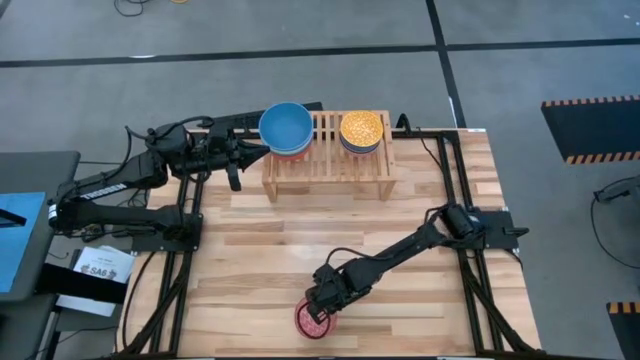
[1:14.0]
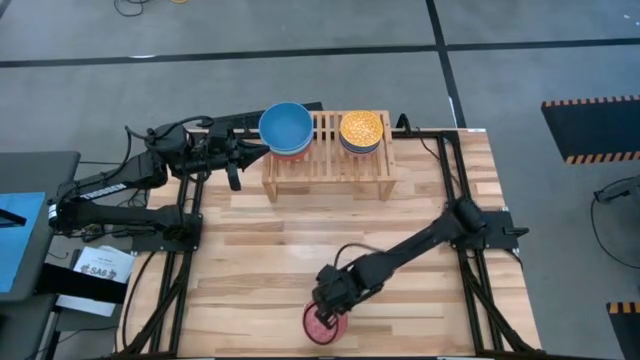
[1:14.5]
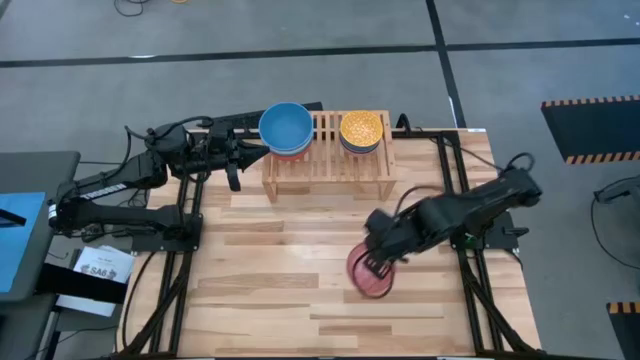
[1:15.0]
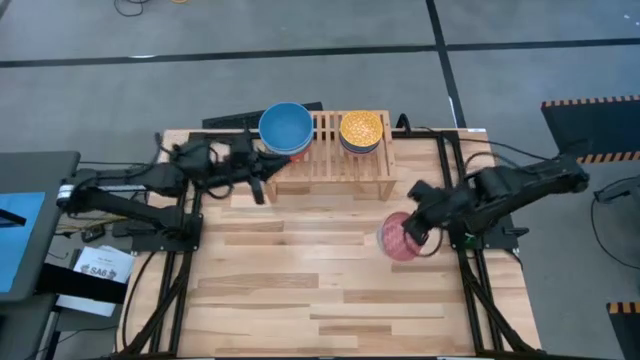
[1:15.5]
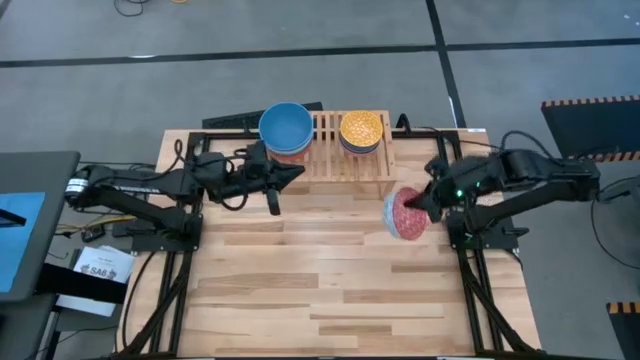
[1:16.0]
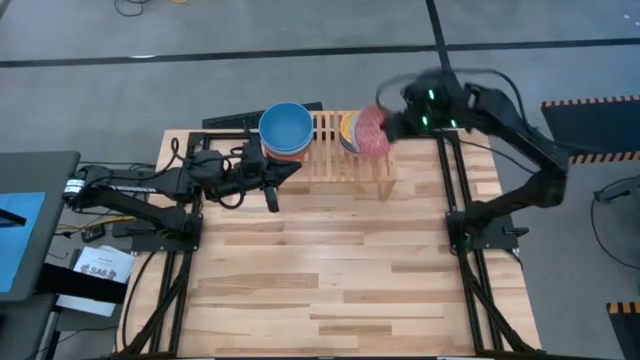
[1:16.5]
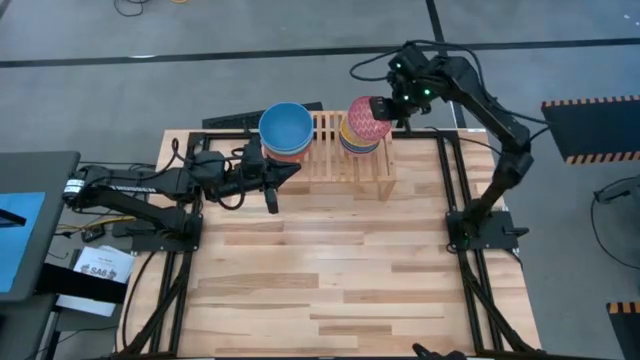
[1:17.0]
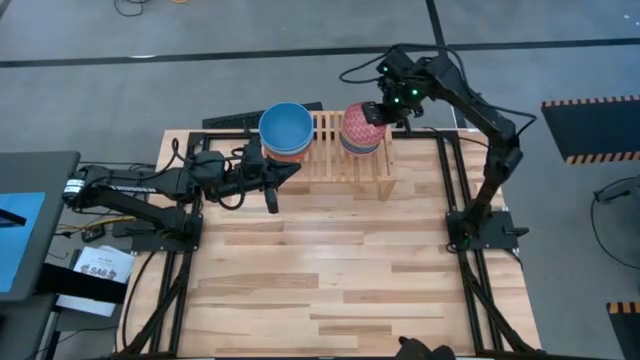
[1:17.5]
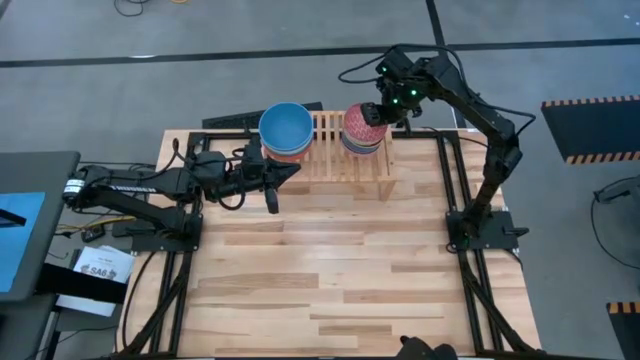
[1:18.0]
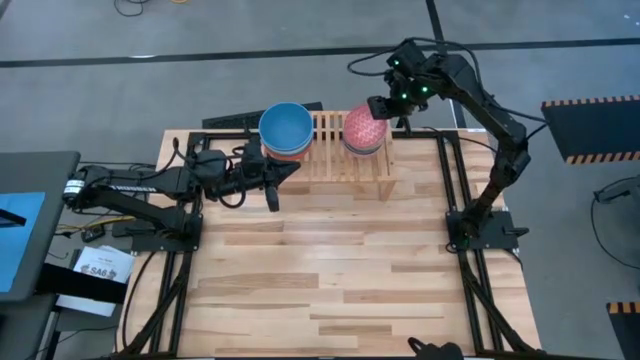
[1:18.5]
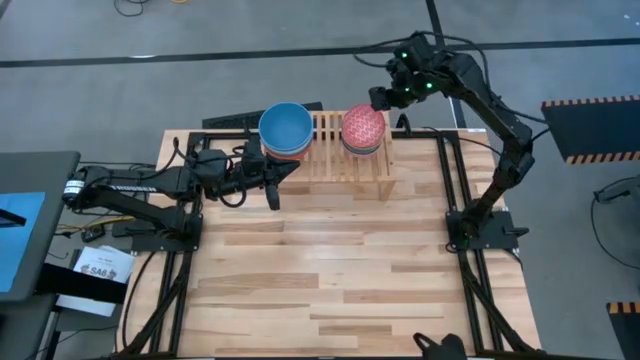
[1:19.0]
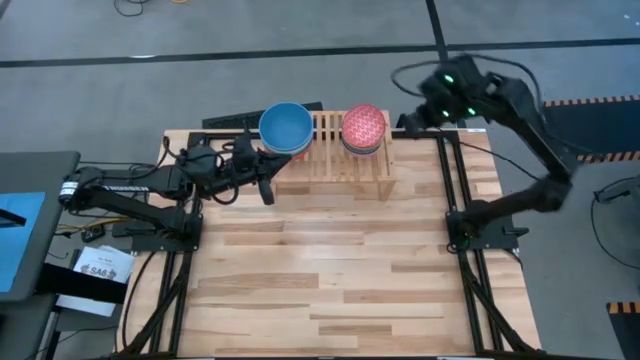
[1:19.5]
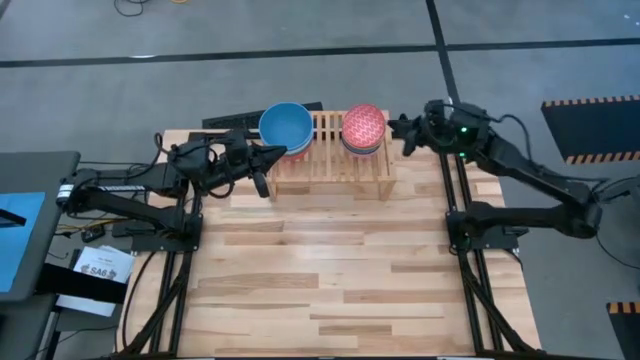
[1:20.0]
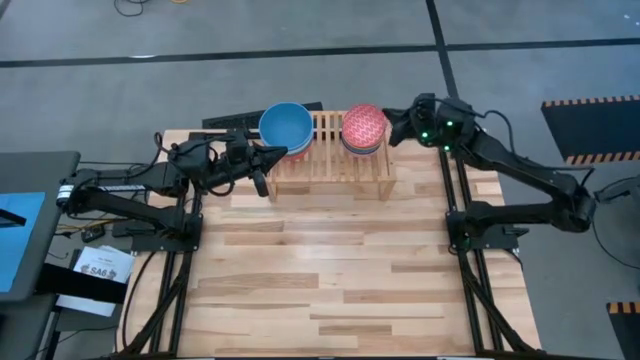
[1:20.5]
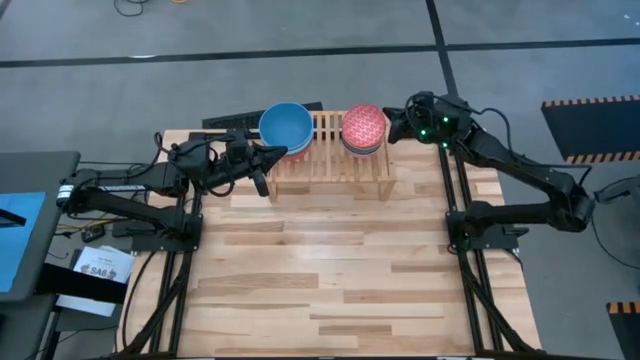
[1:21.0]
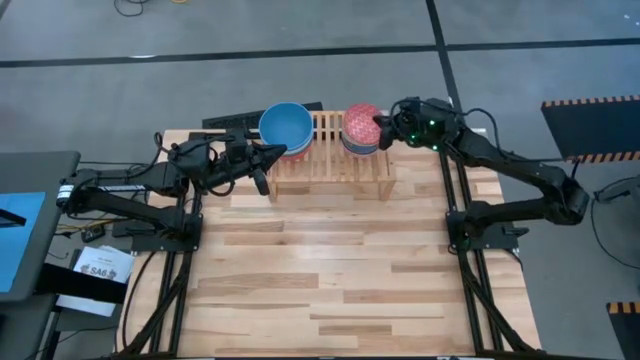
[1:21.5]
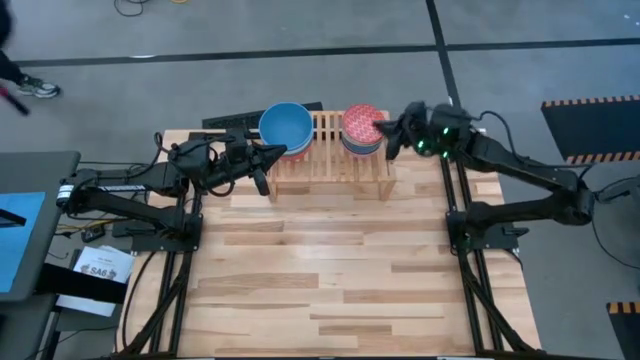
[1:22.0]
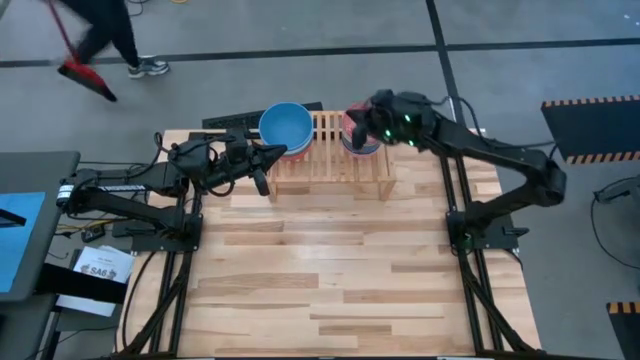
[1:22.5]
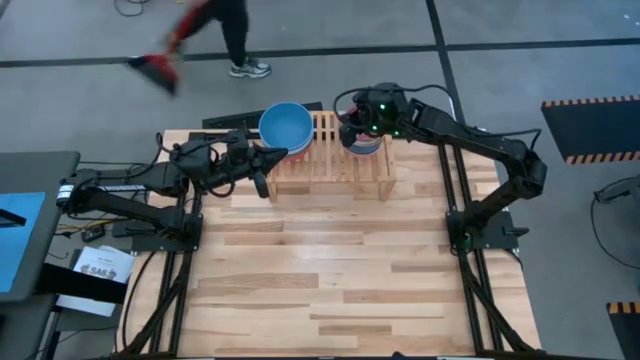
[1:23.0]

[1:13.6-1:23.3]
Task: Place and stack bowls onto a shelf
Stack the small red bowl on top of the small yellow bowl on the shelf

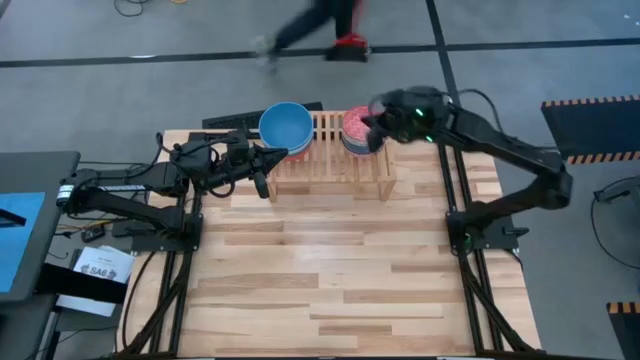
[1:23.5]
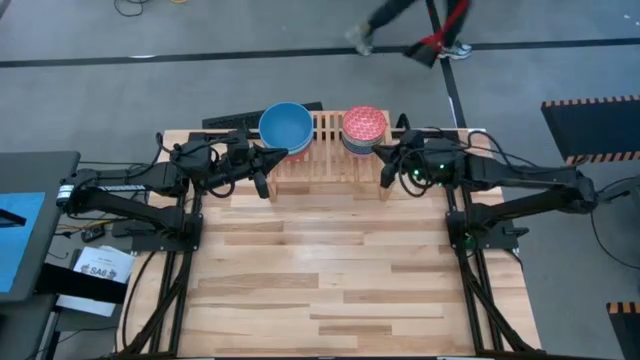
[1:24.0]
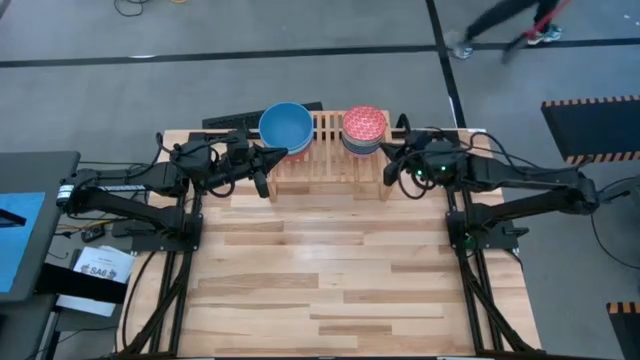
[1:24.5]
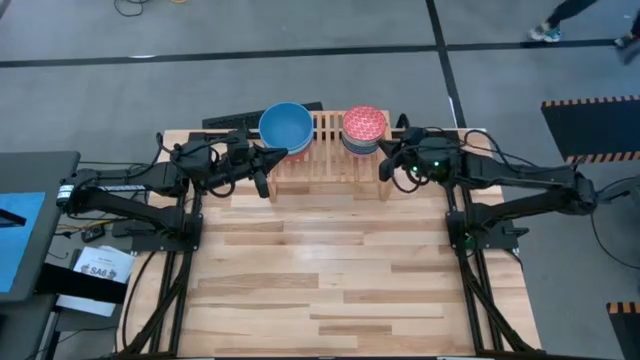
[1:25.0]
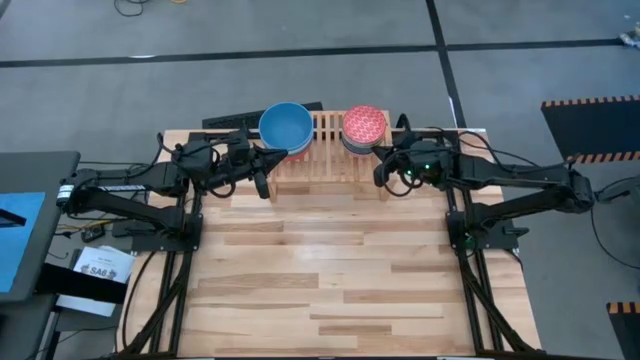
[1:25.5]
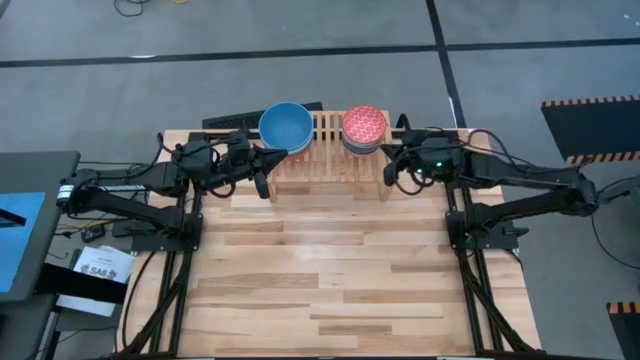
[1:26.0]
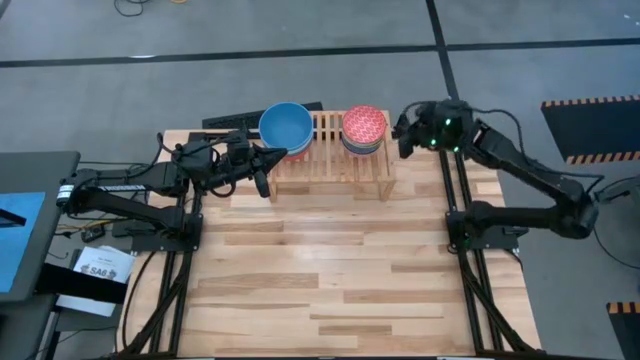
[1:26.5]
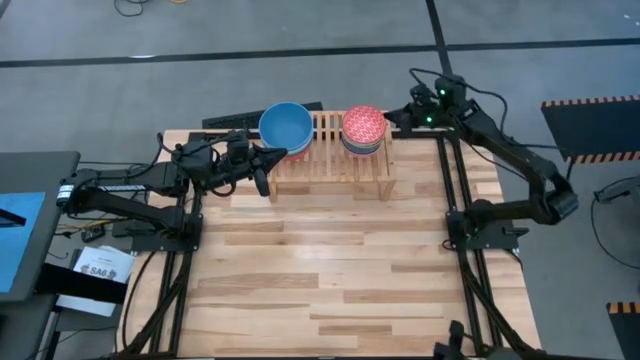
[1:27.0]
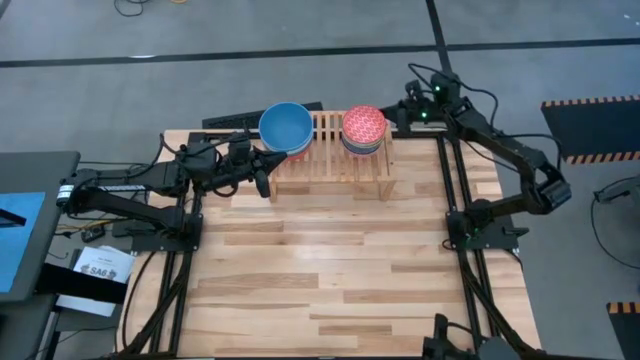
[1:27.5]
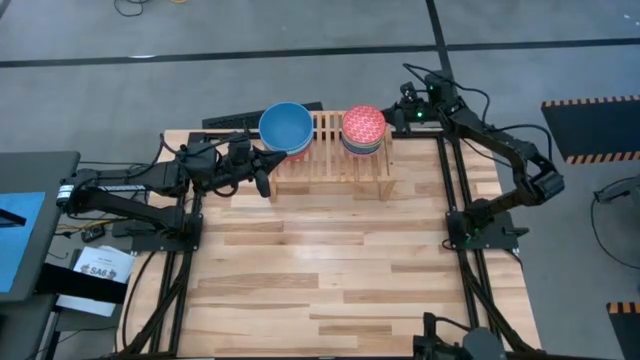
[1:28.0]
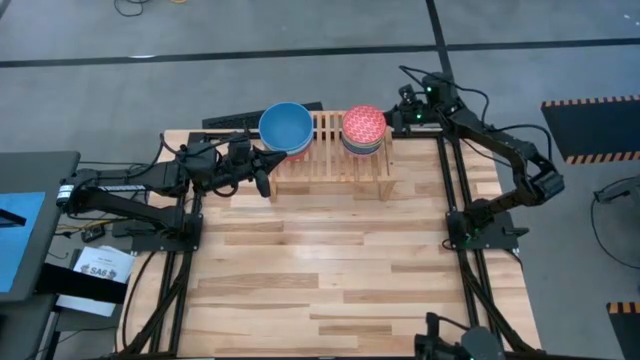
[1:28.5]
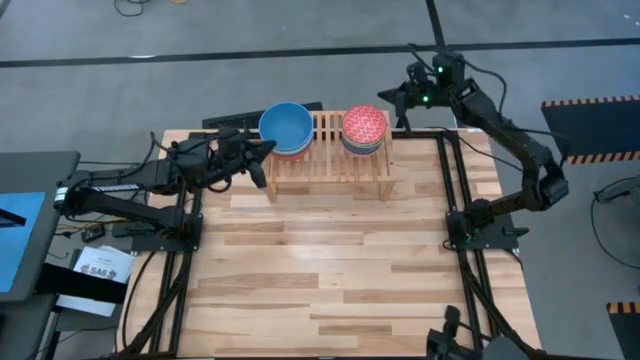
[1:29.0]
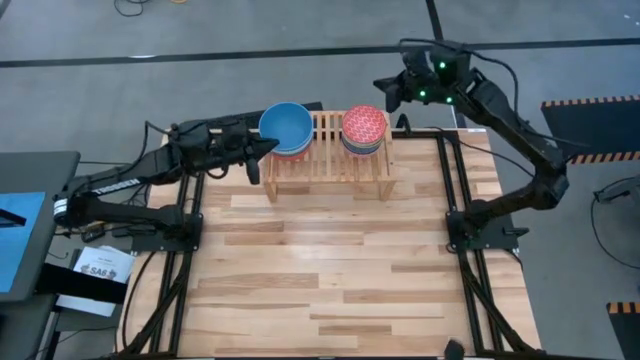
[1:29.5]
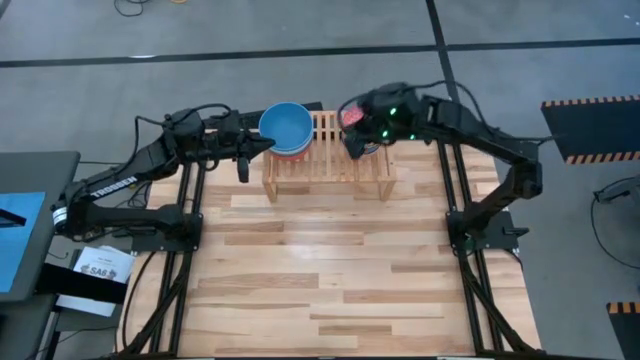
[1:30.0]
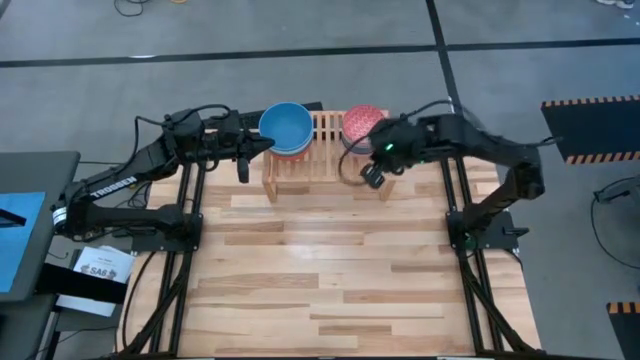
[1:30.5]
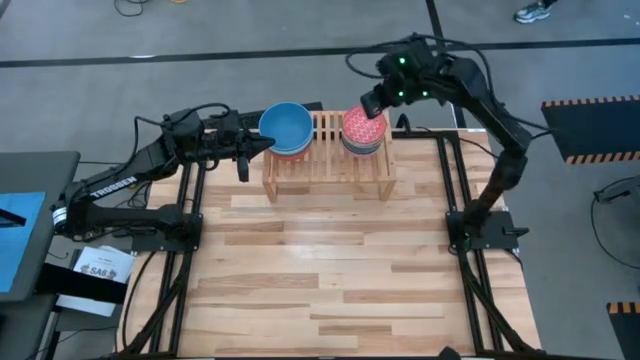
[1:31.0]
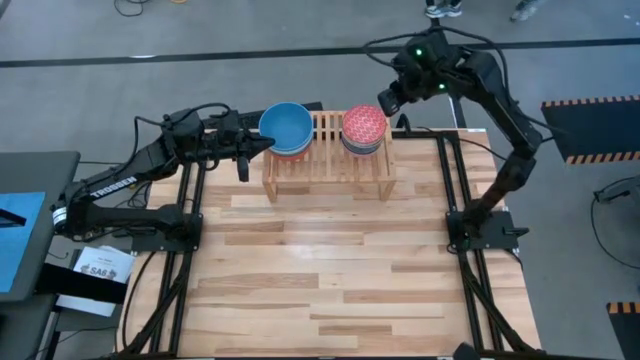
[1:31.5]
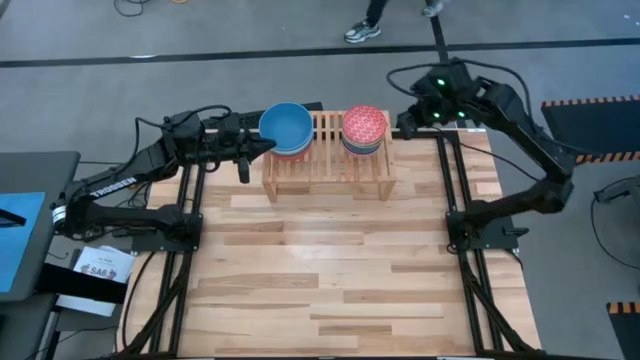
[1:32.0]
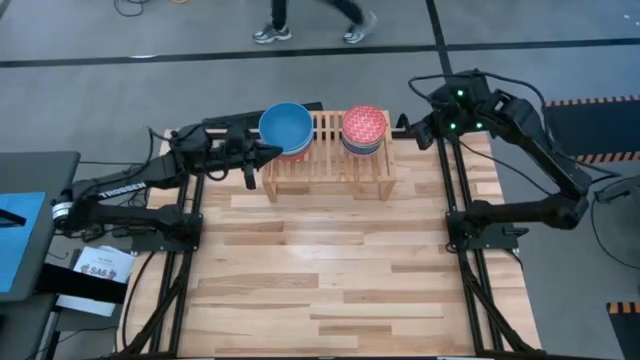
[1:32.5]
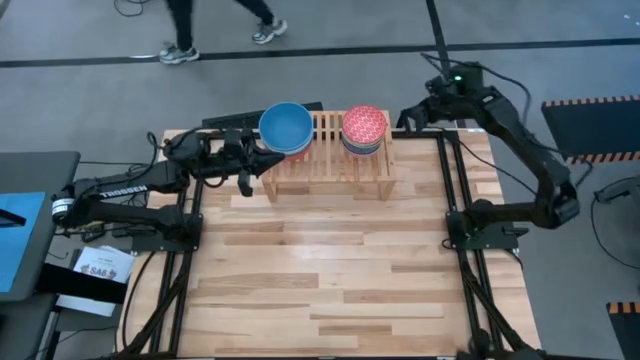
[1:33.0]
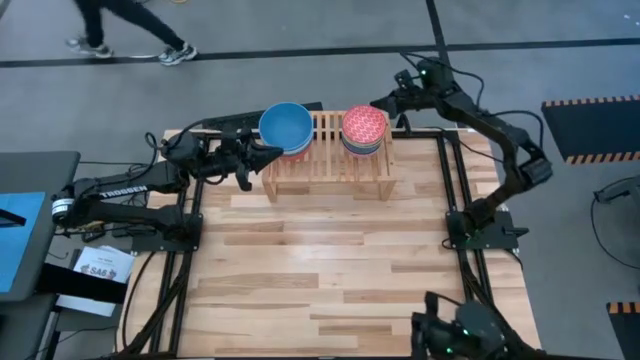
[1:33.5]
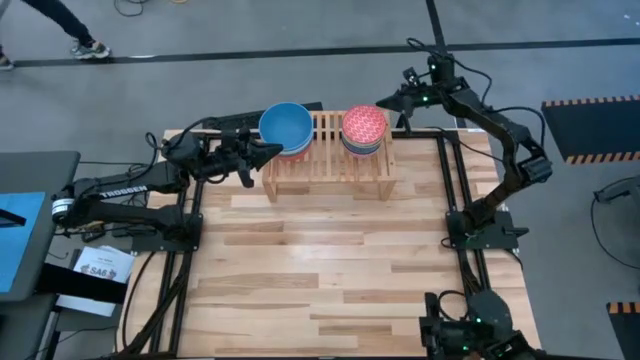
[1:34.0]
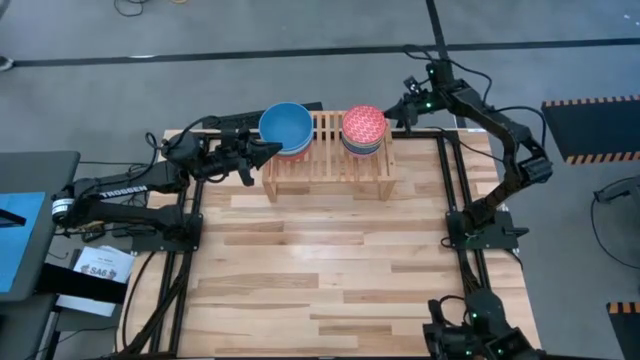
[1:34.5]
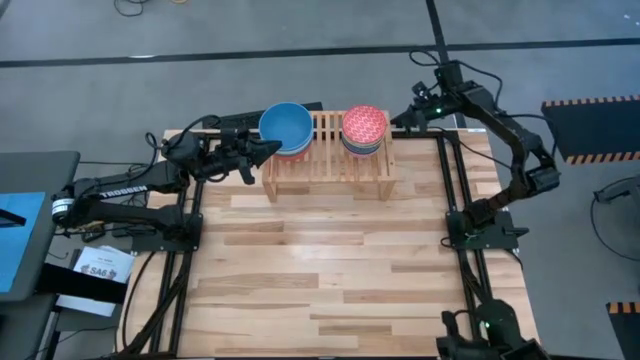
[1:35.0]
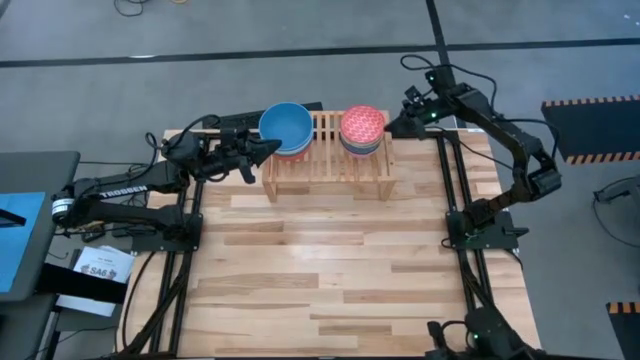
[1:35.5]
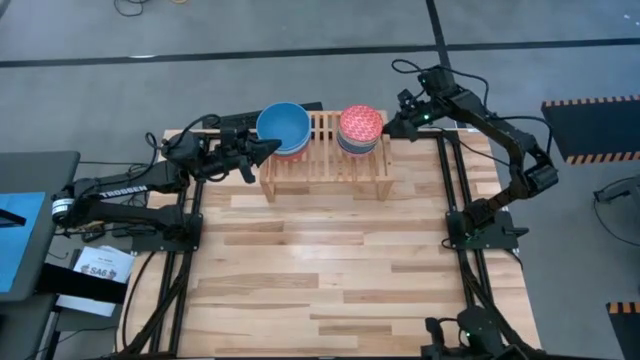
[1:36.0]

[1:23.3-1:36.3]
Adjust the small stacked bowls on the shelf
